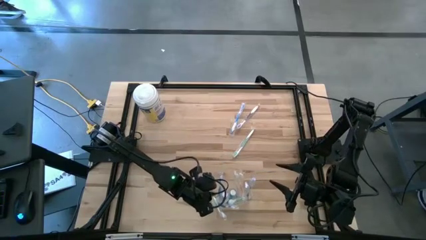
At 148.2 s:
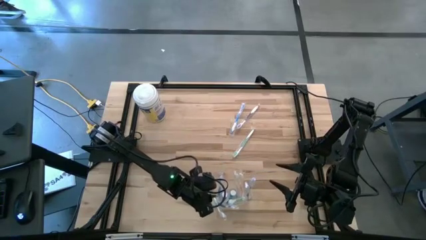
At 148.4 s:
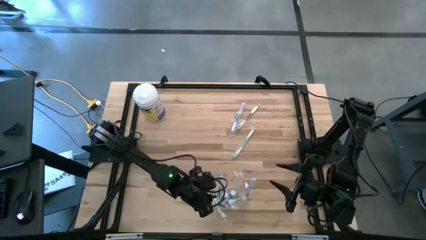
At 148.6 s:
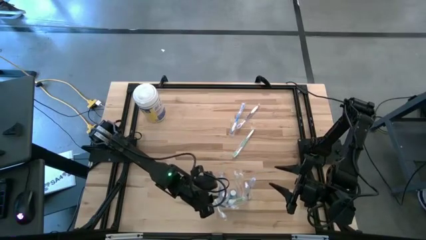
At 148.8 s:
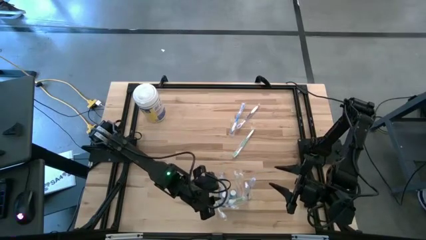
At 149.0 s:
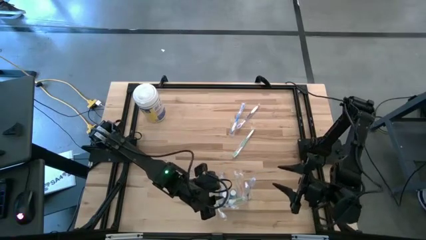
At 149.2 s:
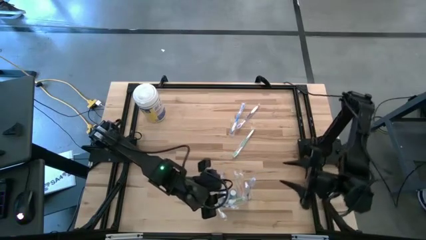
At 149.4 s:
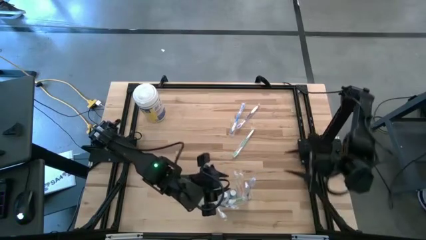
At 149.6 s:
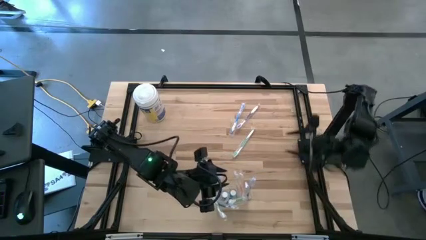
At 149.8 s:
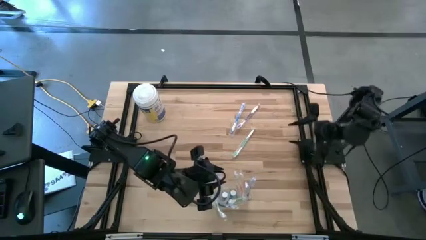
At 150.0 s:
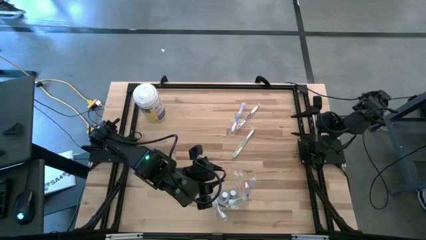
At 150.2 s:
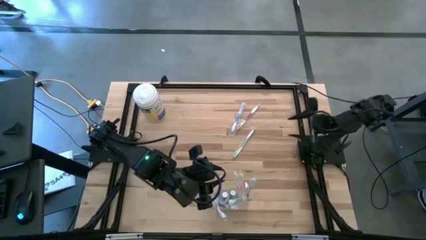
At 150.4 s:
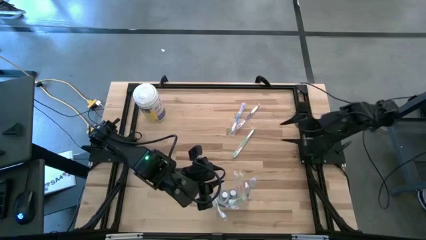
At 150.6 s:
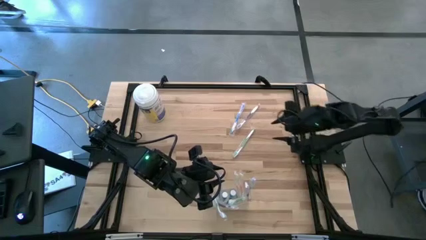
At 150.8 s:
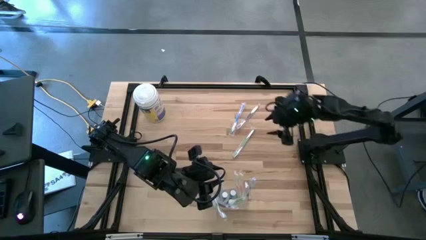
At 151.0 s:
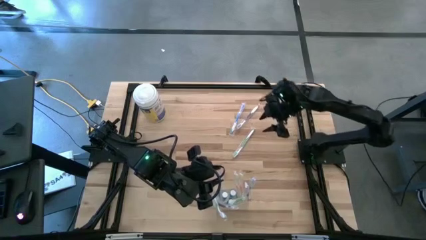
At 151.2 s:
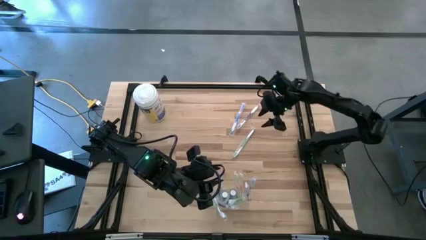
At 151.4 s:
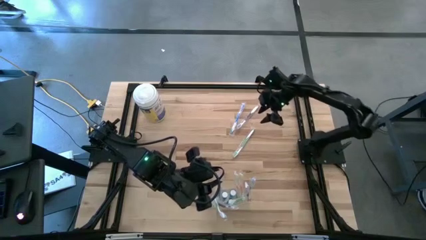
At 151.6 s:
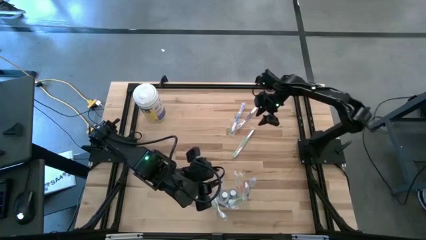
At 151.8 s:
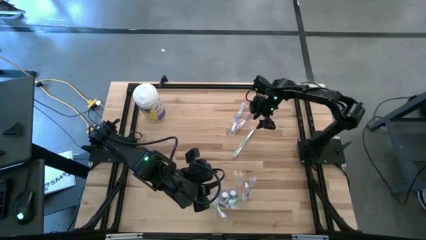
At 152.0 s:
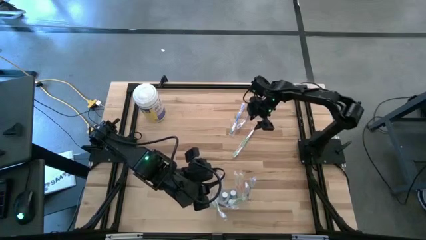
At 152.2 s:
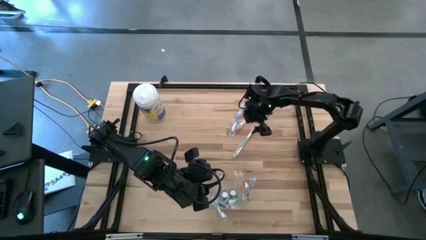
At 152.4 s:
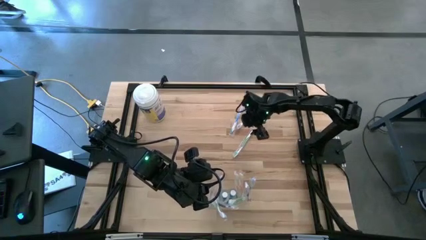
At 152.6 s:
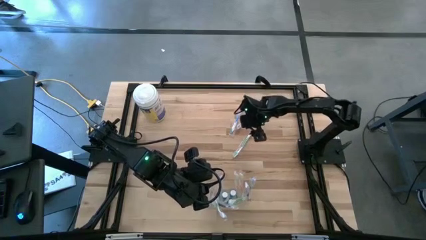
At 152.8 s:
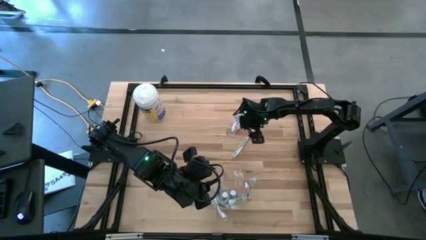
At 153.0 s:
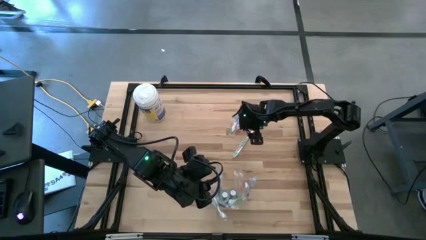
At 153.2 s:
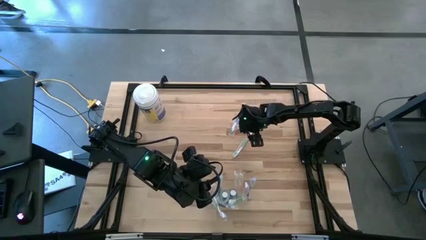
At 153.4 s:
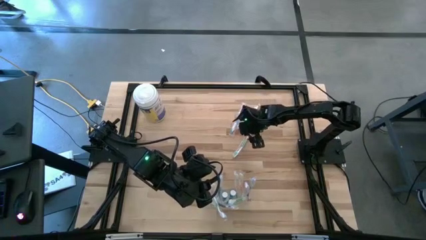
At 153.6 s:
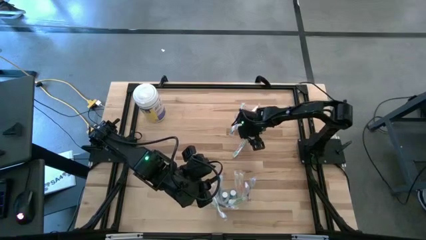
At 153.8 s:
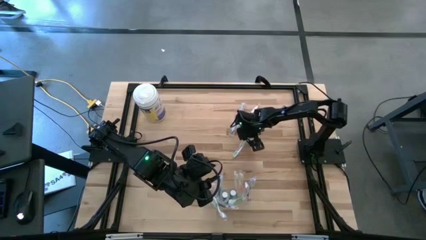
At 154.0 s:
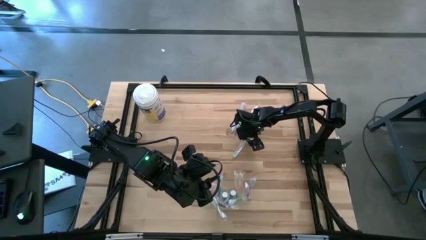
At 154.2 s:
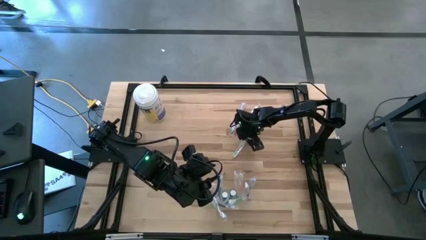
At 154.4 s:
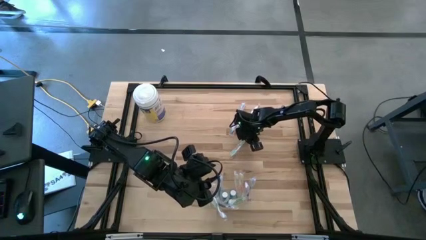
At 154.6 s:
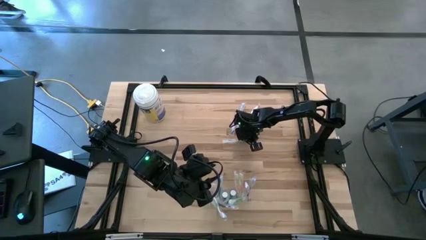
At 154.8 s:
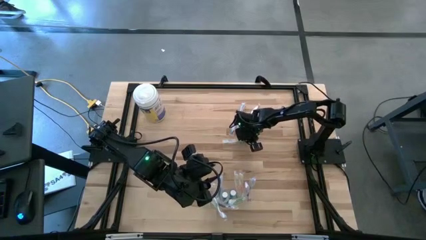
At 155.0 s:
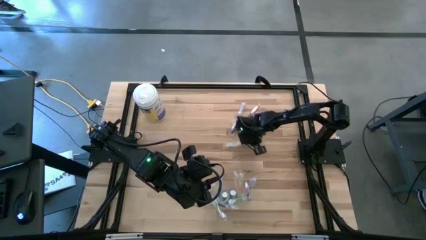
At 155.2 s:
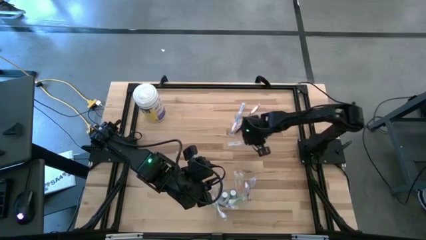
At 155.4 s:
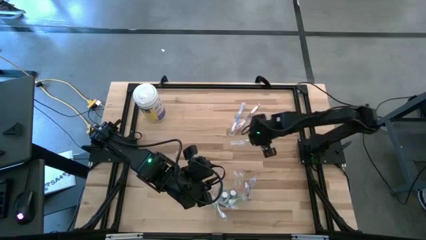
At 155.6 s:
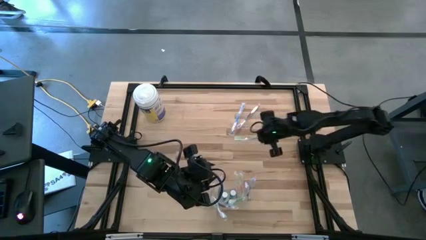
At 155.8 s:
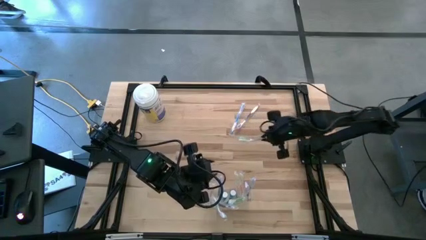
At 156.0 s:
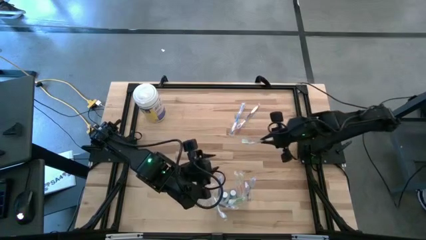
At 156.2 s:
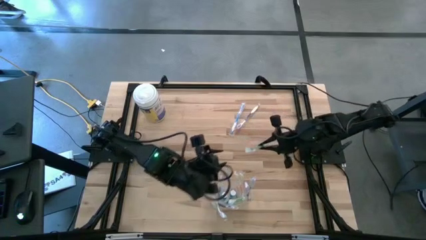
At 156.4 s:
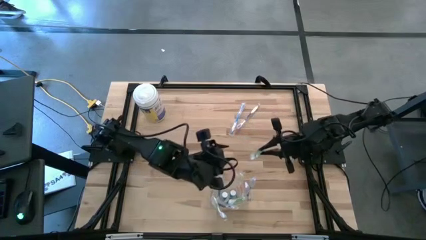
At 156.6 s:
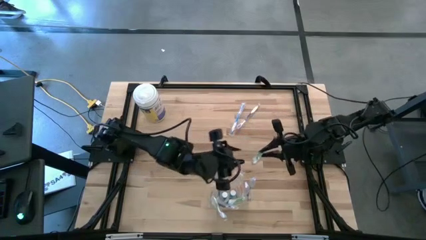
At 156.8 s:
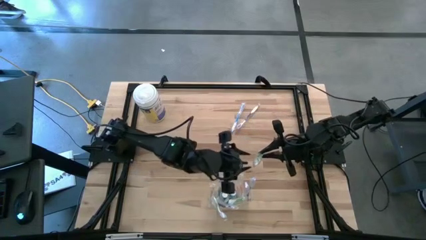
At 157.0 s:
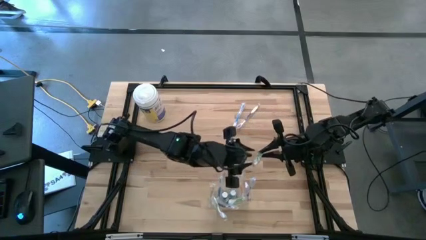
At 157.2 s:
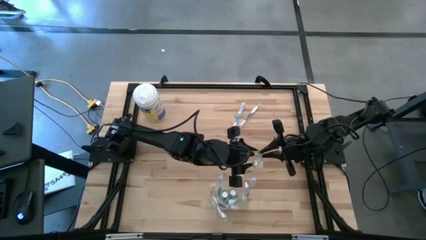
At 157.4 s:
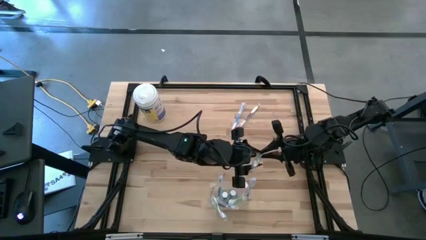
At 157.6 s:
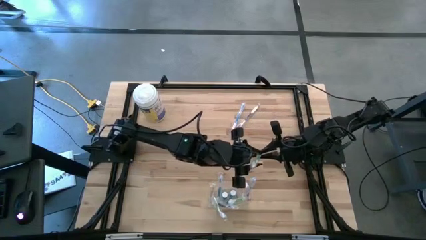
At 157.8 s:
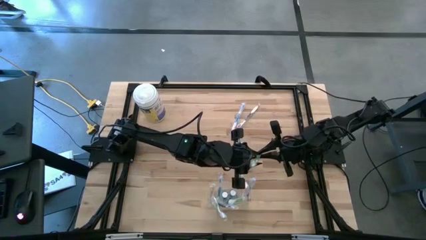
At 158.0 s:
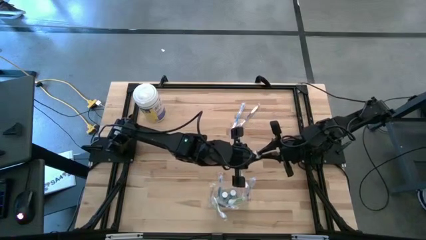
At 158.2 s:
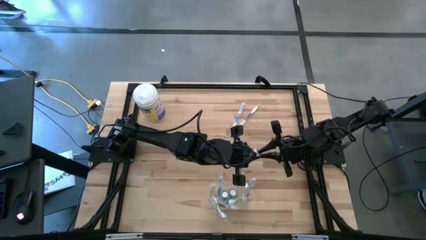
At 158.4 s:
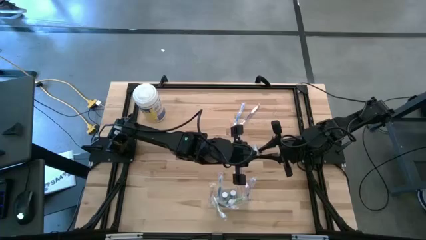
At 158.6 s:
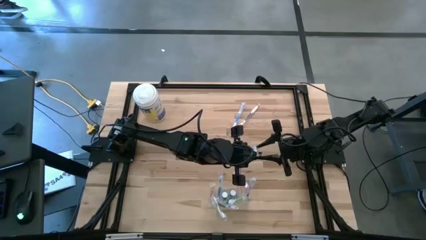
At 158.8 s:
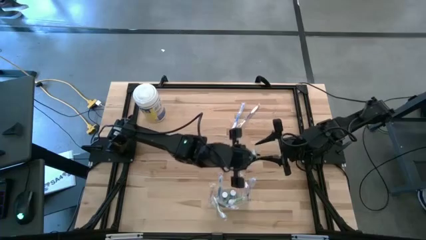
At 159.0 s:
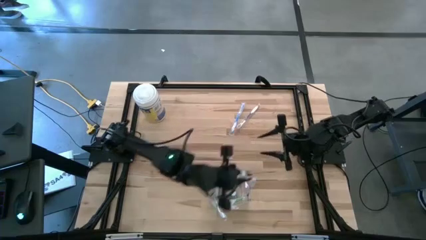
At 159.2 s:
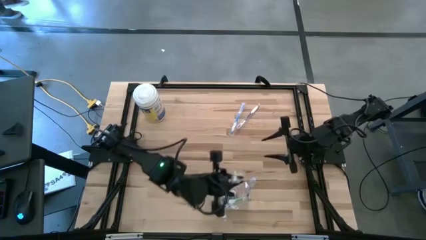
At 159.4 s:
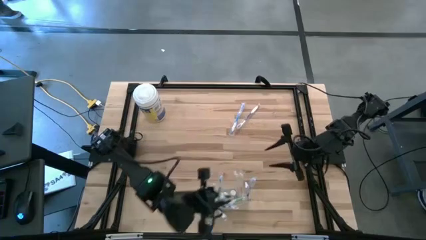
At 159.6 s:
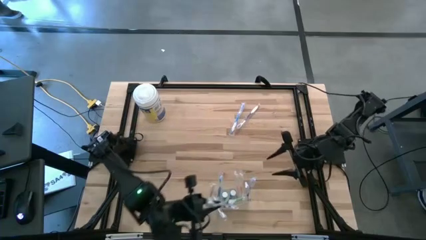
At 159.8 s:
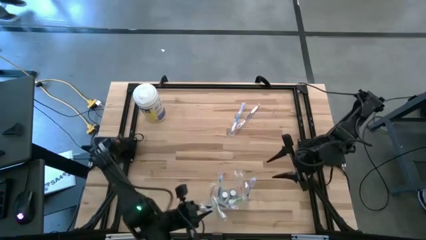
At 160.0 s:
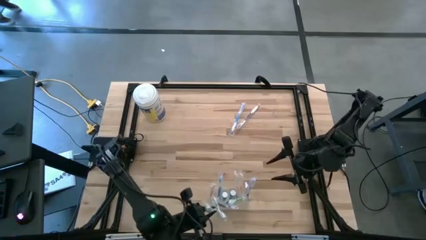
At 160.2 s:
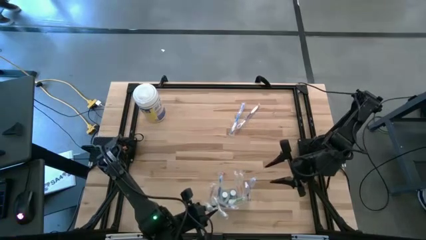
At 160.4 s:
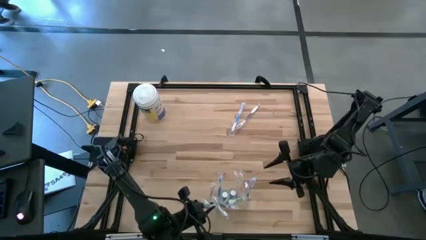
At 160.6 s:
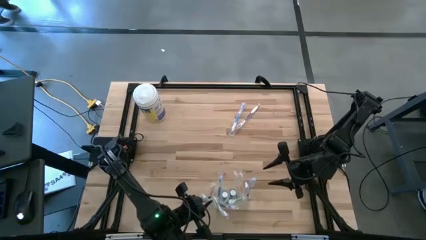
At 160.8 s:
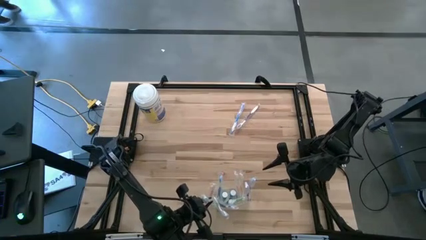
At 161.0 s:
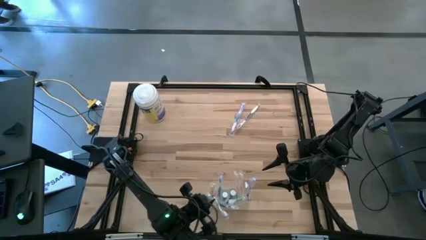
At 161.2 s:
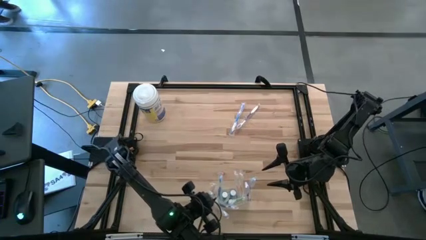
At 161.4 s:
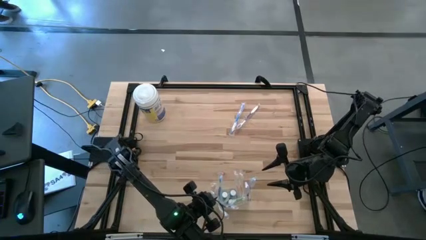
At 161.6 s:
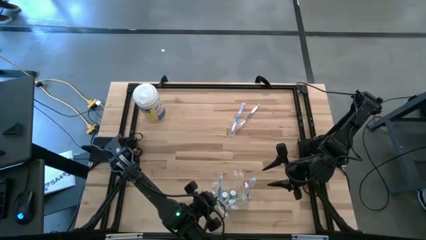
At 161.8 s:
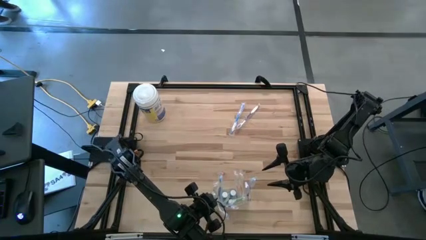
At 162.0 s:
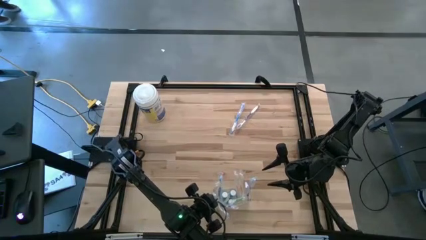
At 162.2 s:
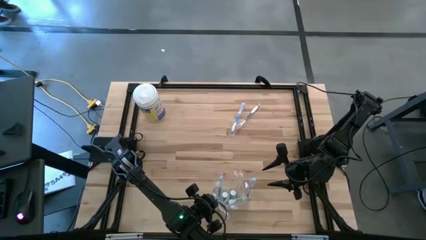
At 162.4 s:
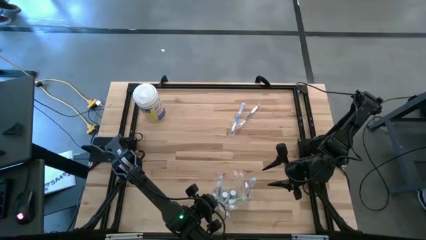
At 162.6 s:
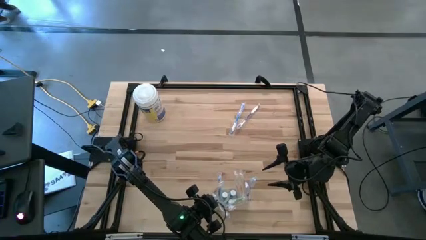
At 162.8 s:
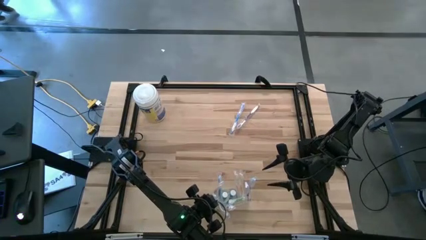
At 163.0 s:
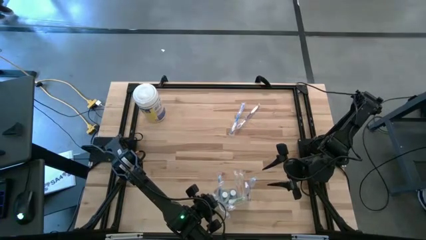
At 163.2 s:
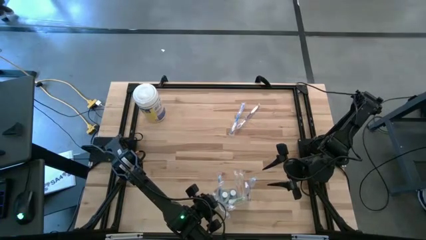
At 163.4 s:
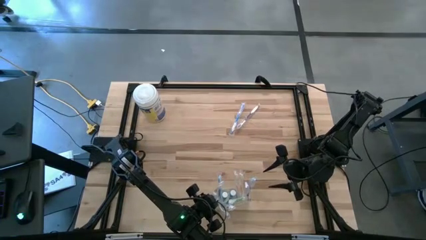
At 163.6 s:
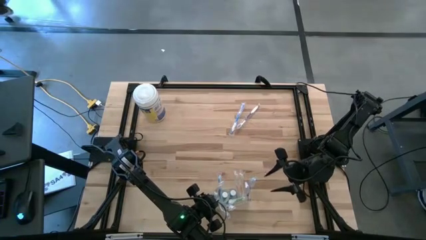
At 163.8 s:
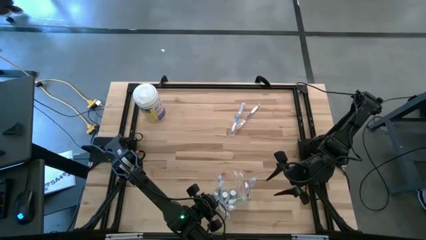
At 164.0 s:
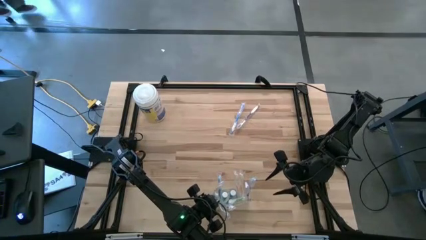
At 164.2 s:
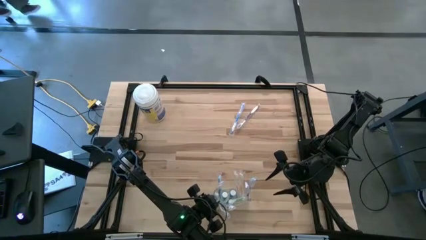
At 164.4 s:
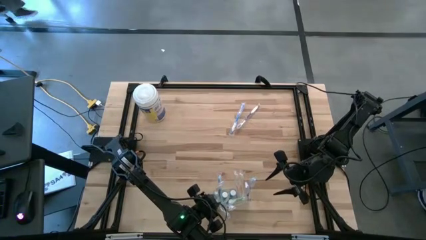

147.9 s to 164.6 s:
Task: Pick & Place toothbrushing station
Put the green toothbrush into the transparent bin
